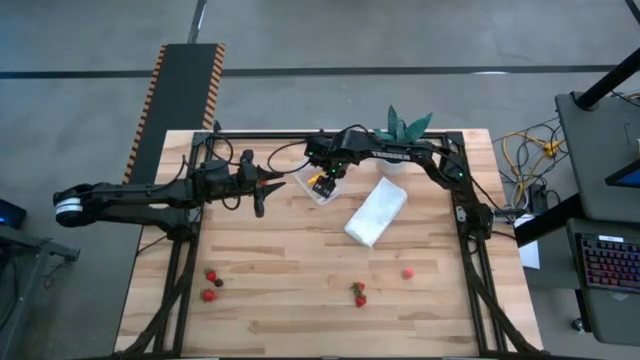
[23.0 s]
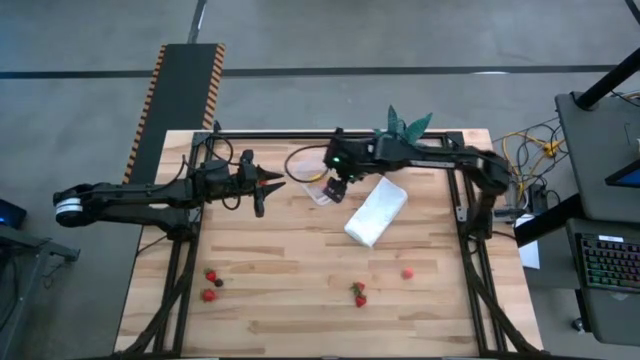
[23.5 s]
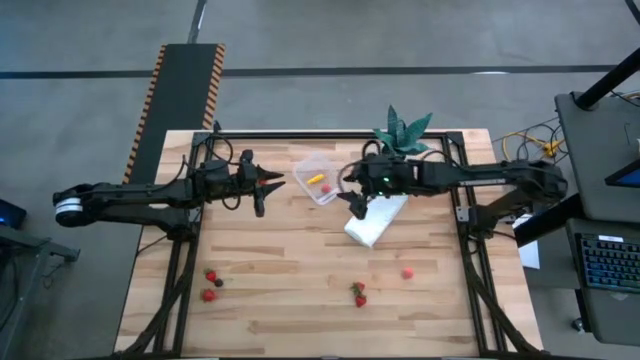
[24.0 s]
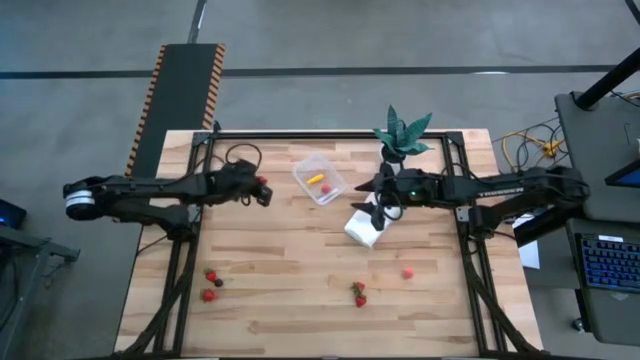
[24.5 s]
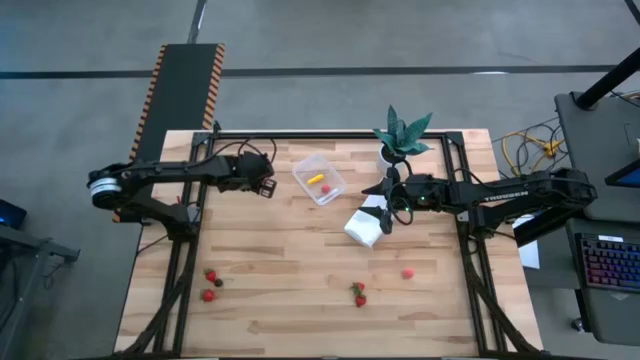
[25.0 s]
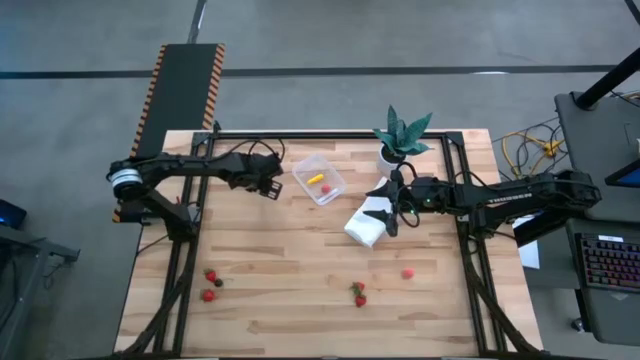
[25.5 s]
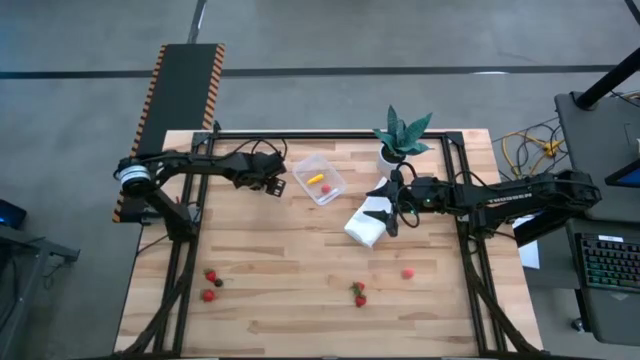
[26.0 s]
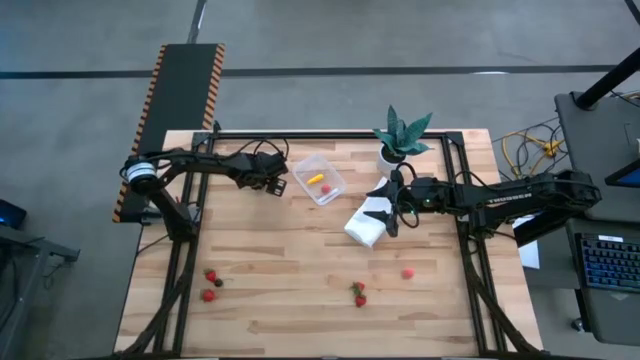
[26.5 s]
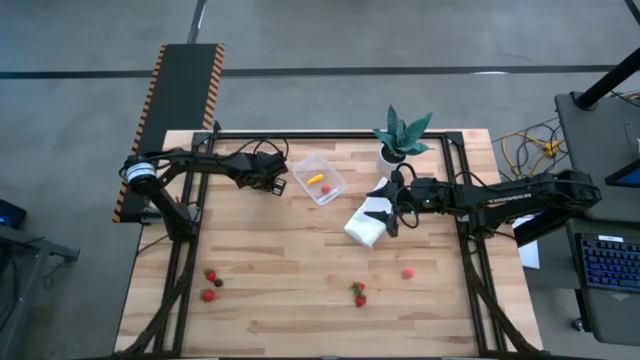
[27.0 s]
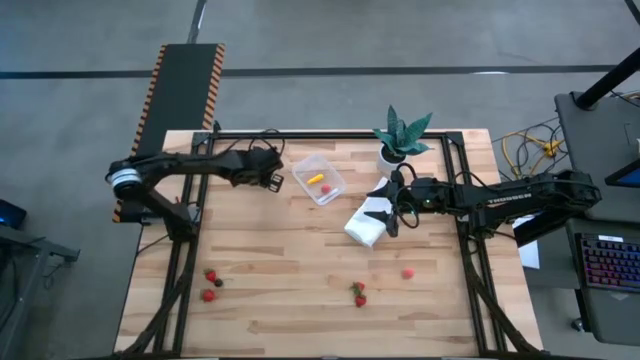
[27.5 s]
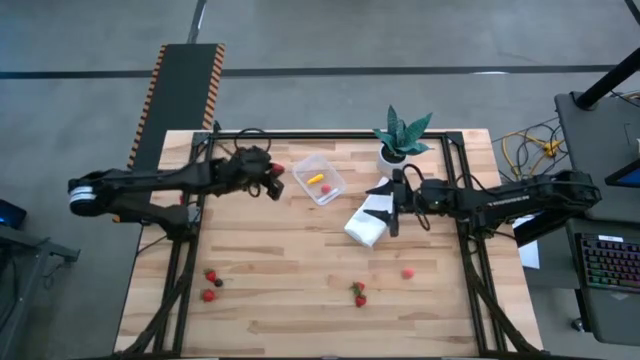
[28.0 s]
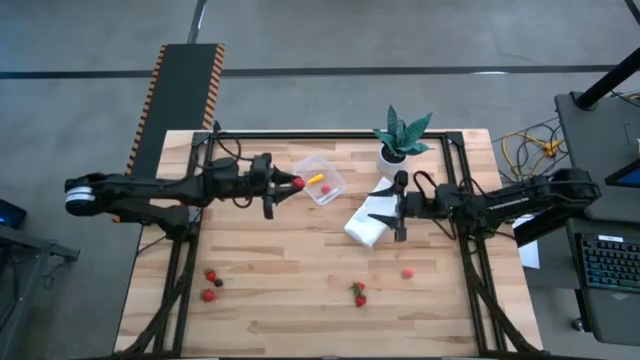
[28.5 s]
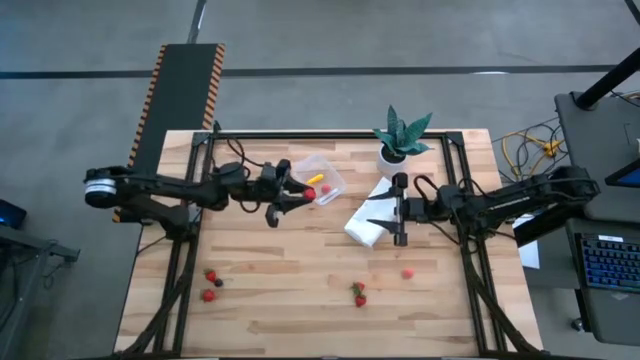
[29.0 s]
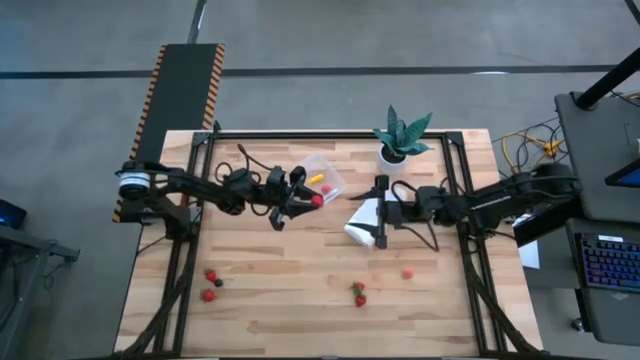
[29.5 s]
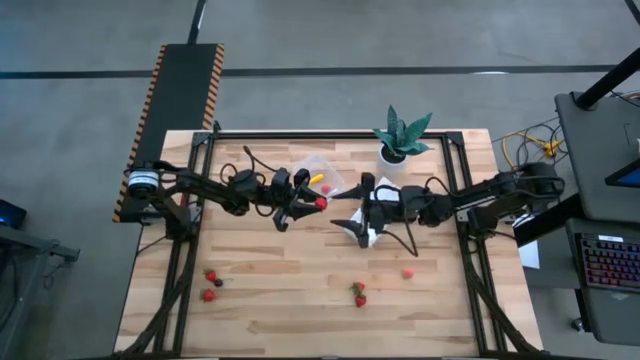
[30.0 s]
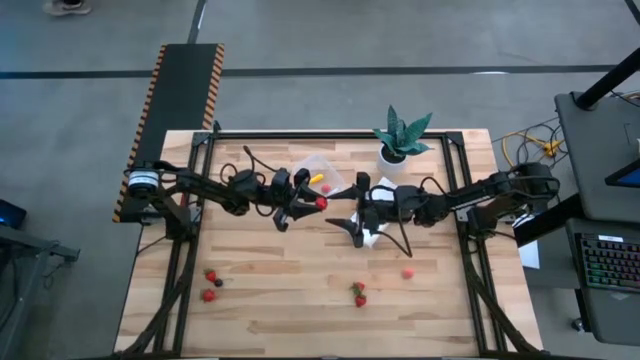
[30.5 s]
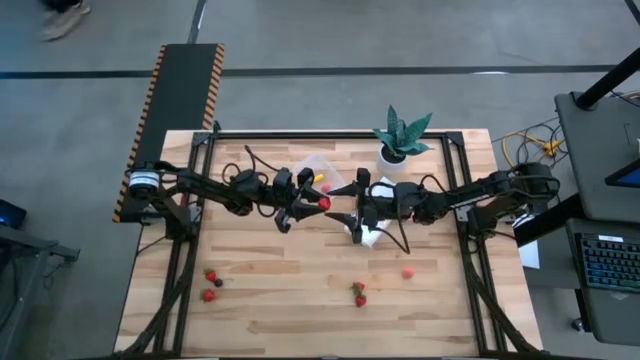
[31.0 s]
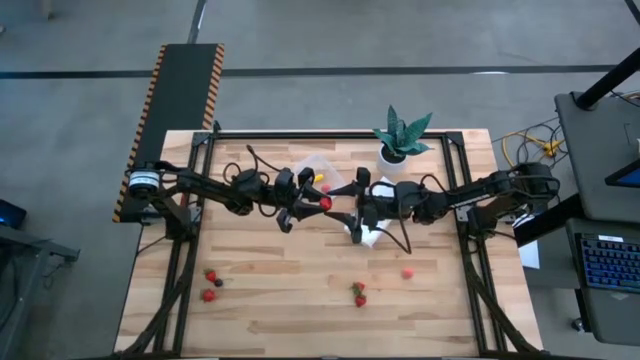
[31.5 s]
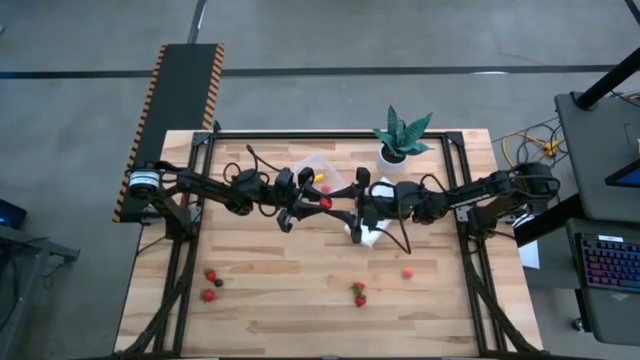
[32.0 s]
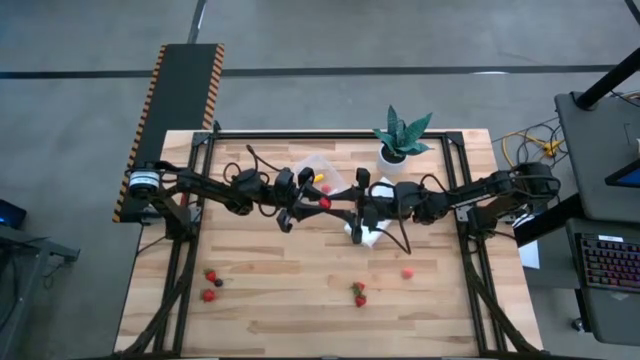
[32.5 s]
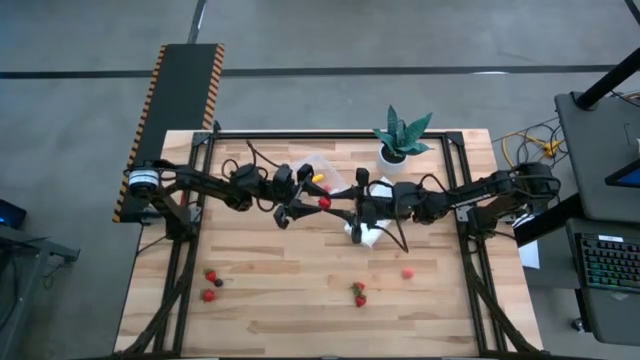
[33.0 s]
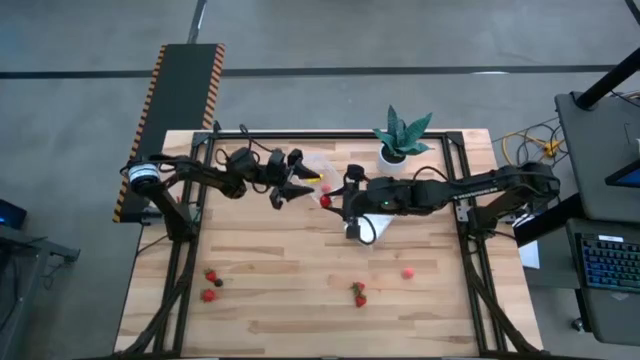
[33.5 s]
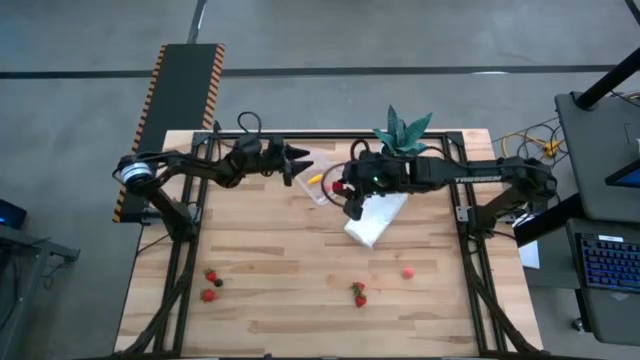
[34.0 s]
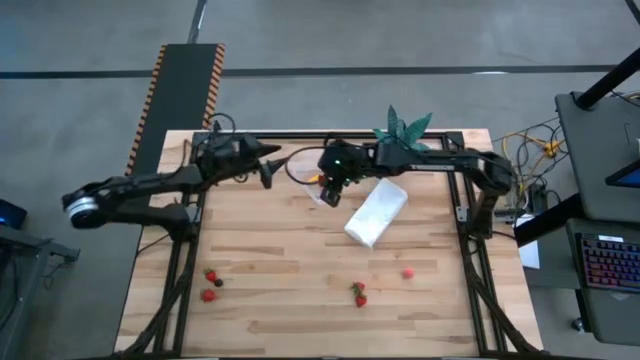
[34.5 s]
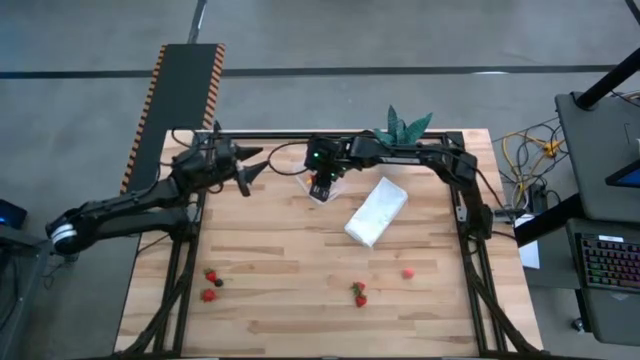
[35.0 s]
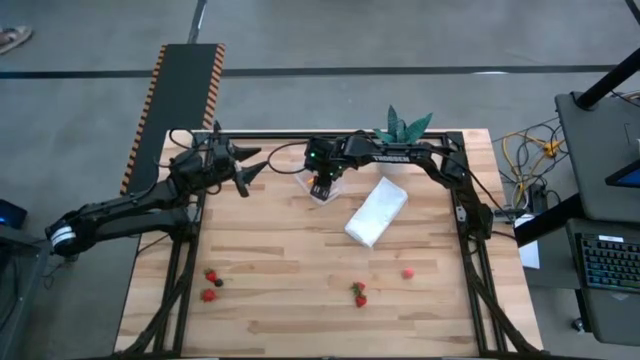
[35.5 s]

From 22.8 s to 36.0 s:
Task: Pick and placing Produce into tupperware
Put the strawberry into the transparent bin

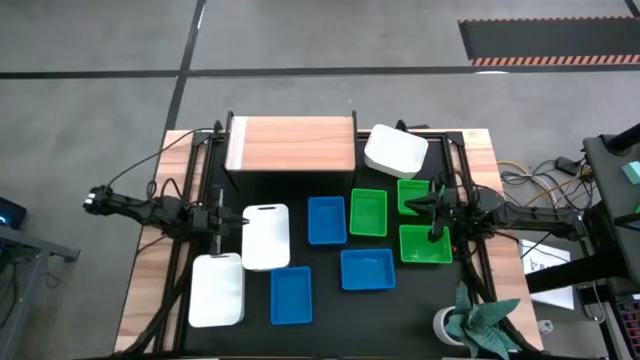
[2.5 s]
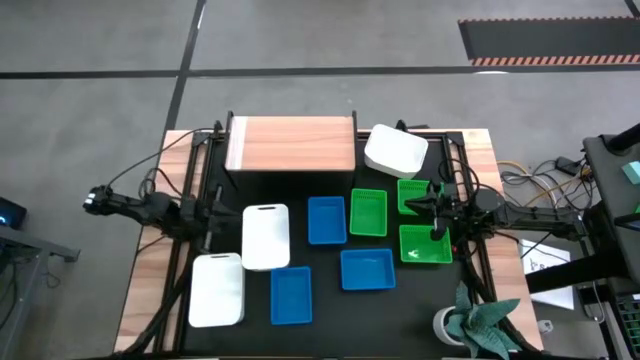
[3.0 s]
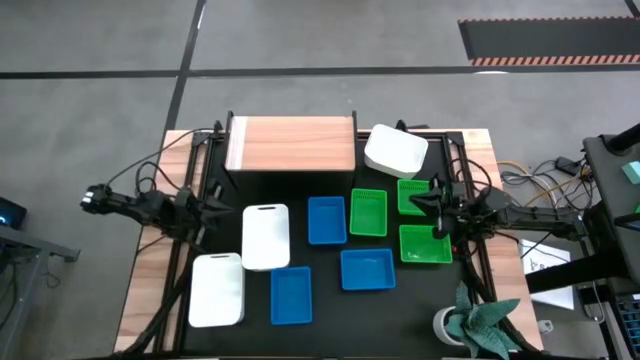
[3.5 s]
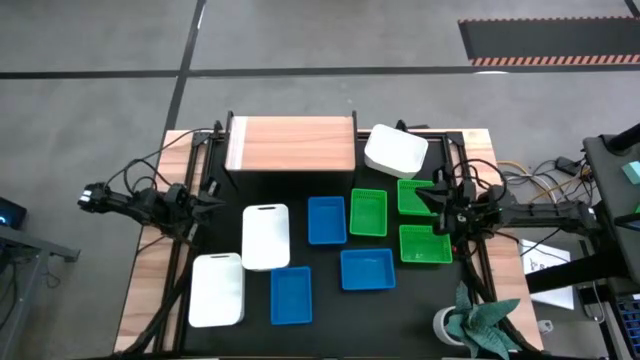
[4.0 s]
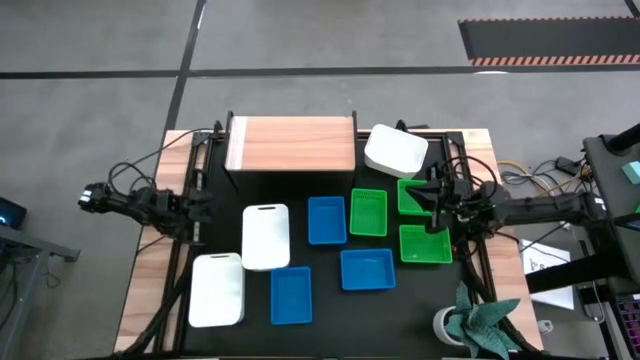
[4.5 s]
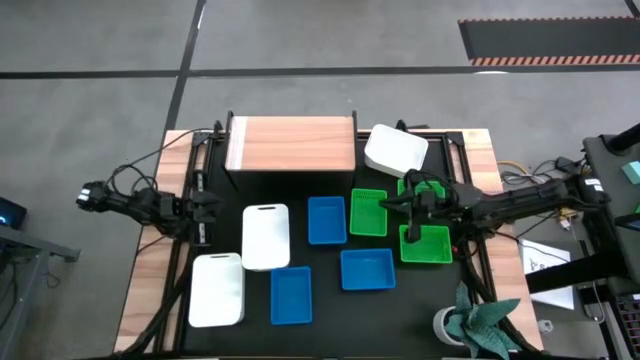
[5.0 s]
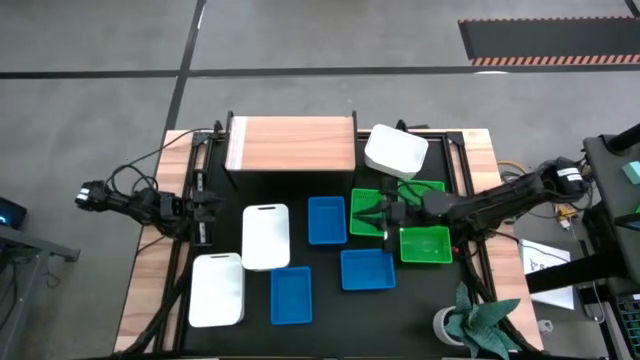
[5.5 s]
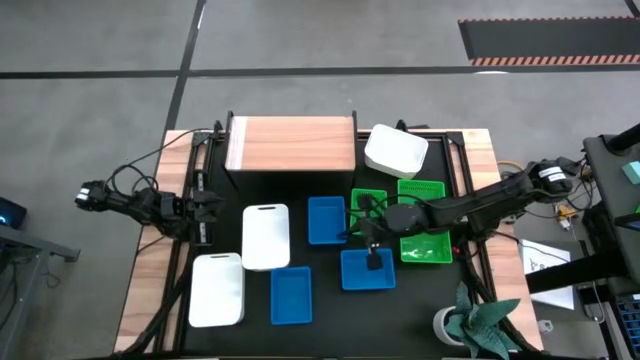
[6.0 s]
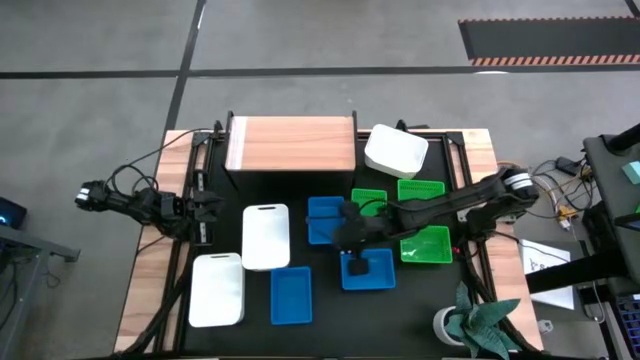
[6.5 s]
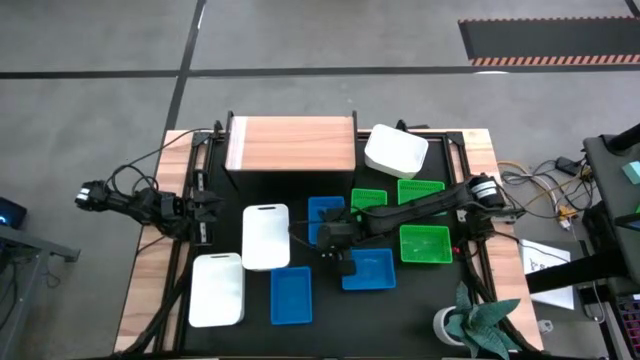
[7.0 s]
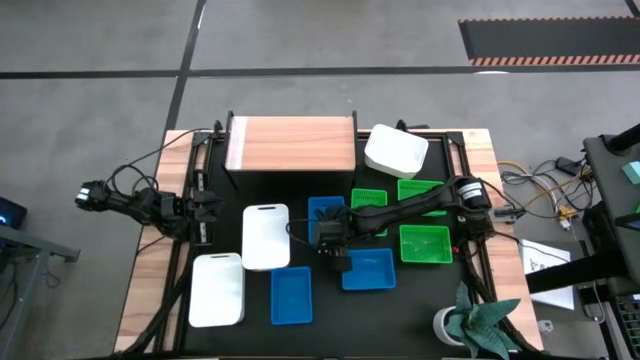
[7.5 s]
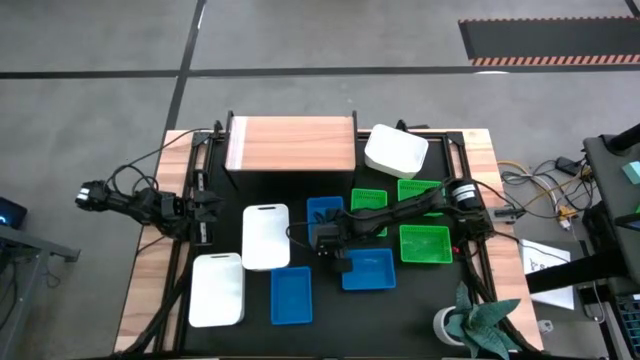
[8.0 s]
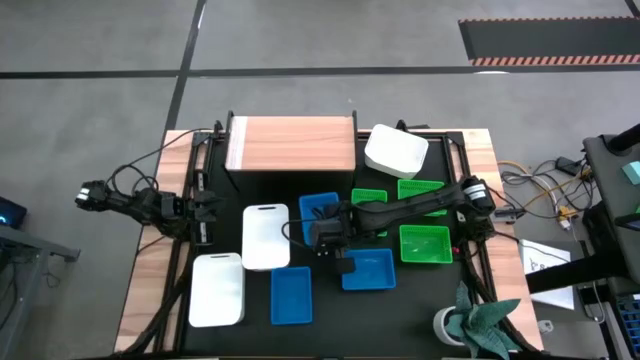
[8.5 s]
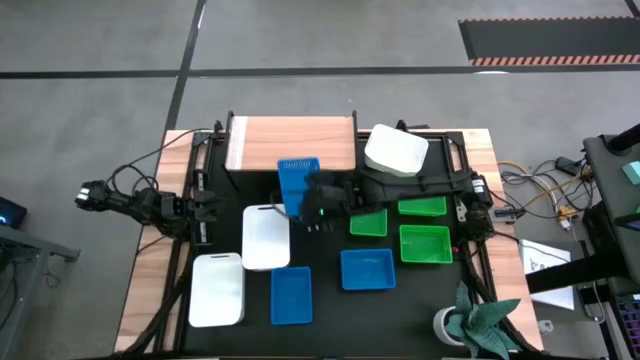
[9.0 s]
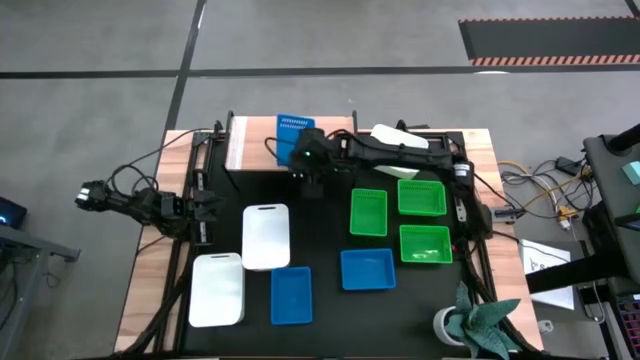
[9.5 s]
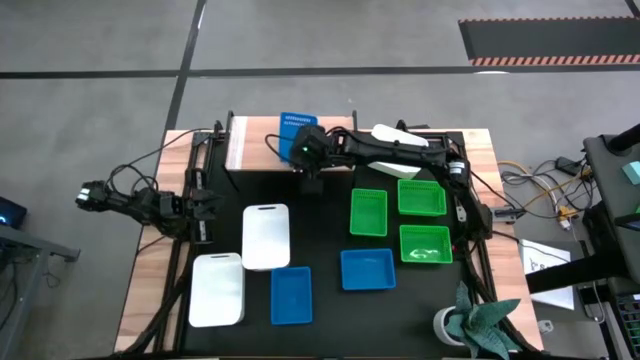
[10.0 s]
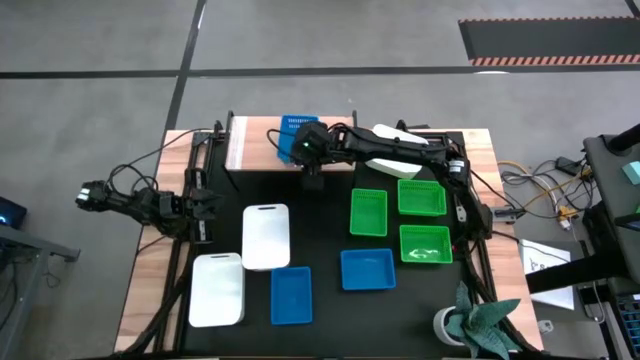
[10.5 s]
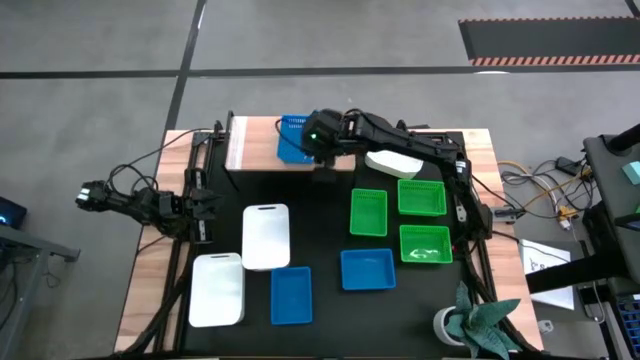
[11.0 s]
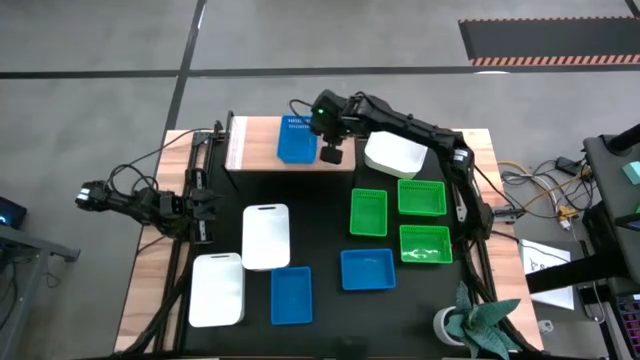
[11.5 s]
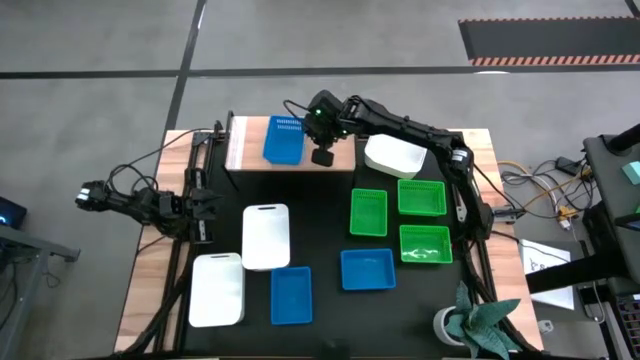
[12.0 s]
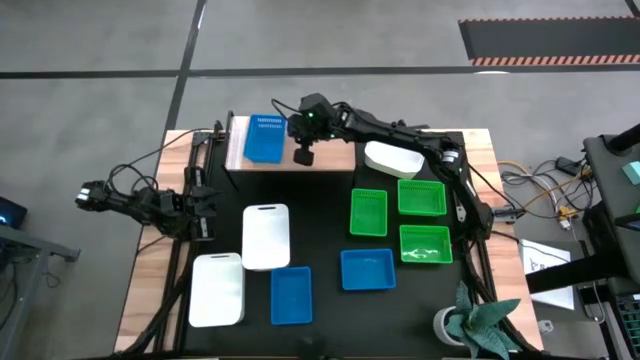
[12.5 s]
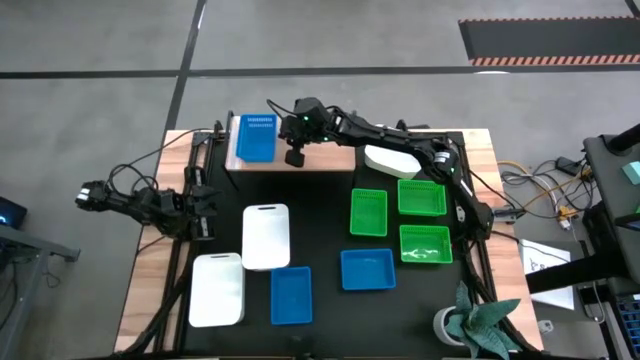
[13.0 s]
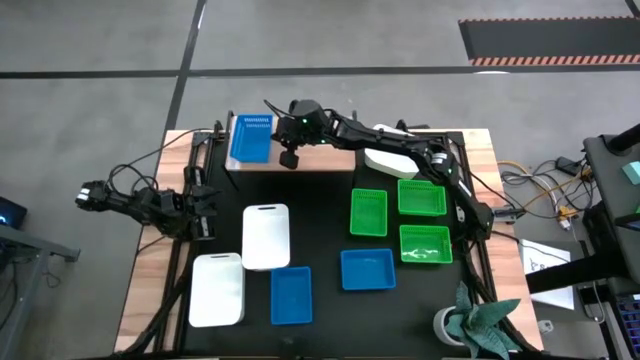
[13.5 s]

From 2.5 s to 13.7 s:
Task: Stack baskets on shelf by color
Put the top blue bin on the shelf
